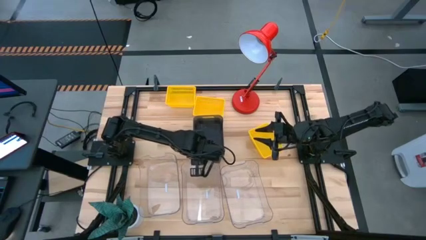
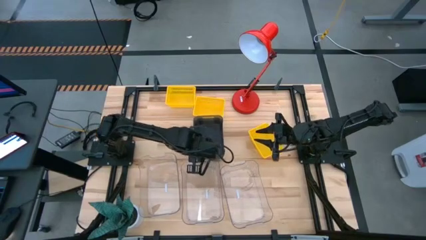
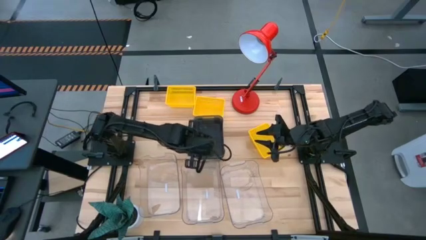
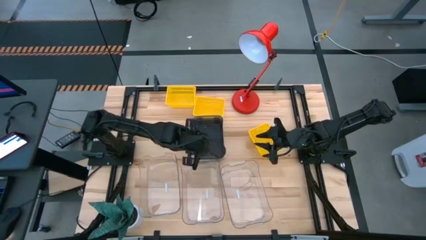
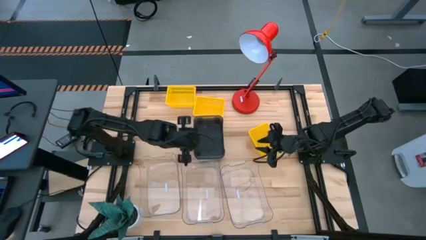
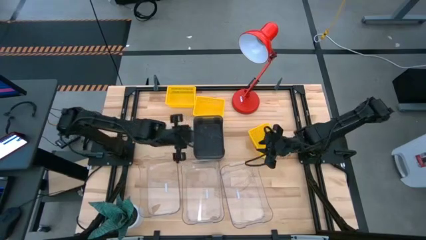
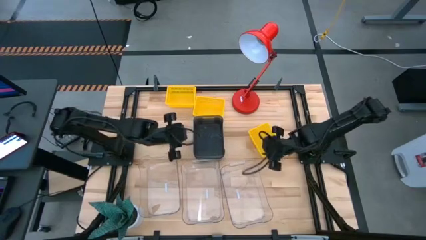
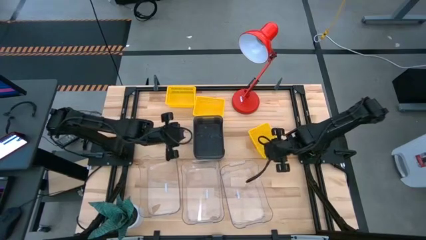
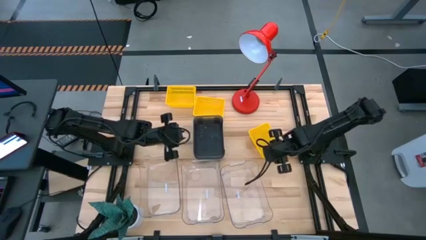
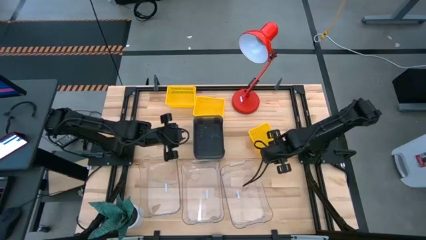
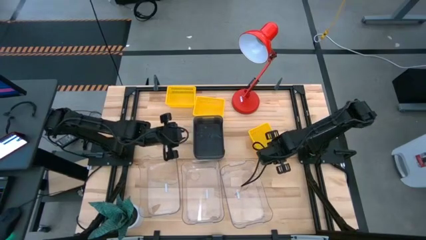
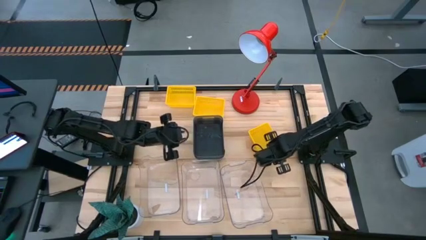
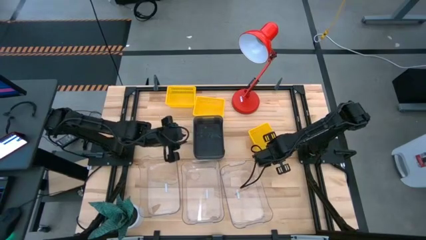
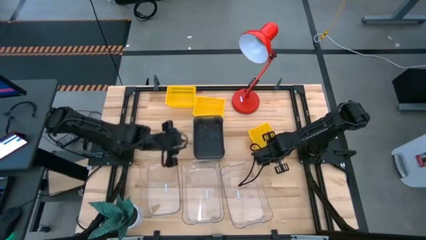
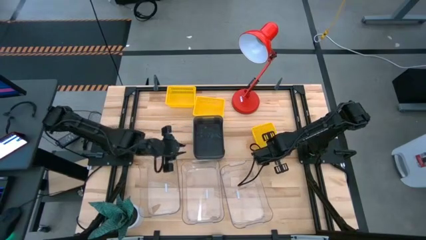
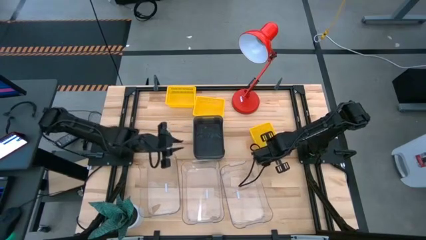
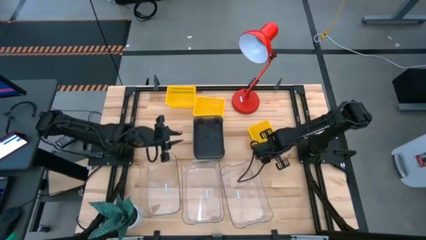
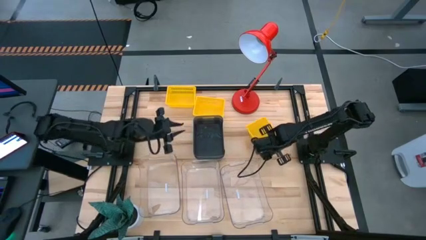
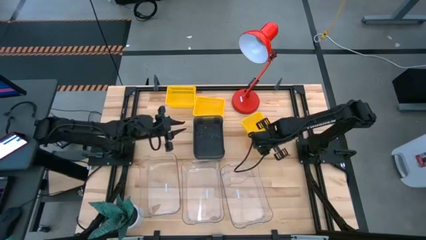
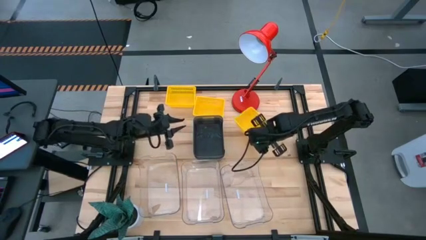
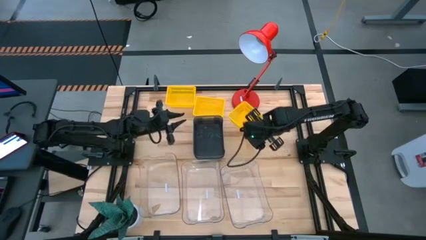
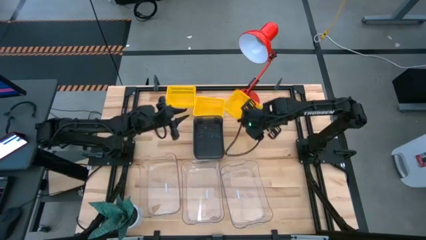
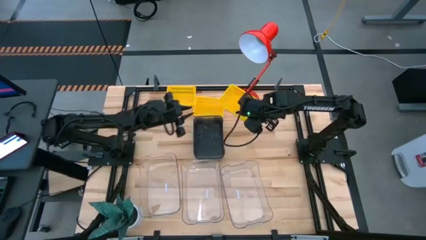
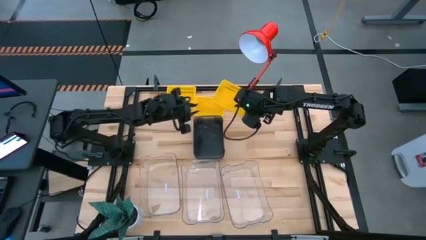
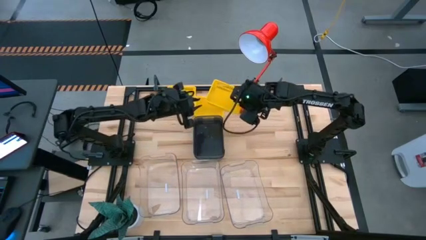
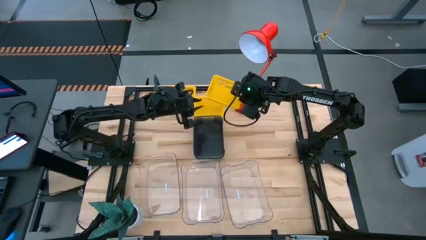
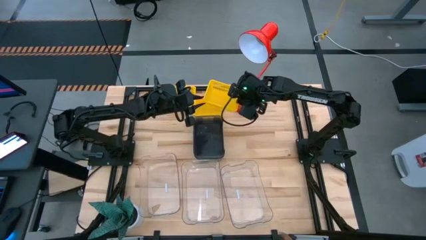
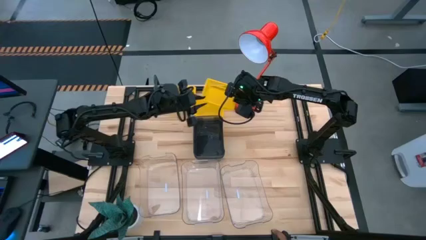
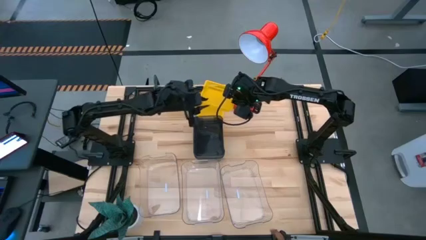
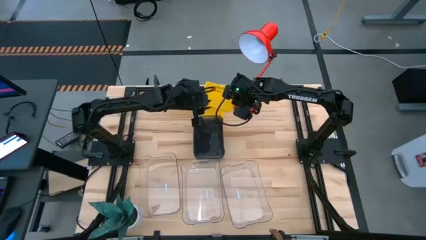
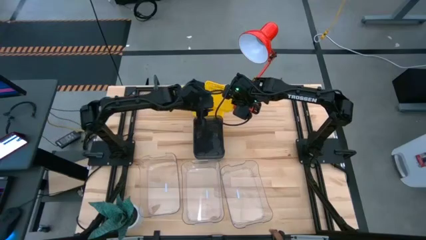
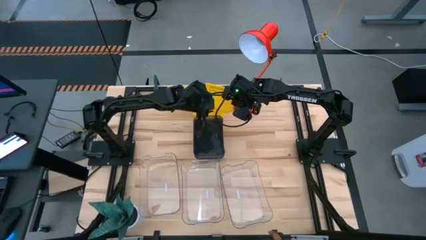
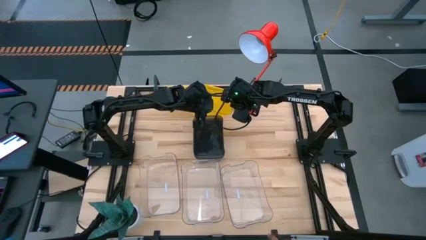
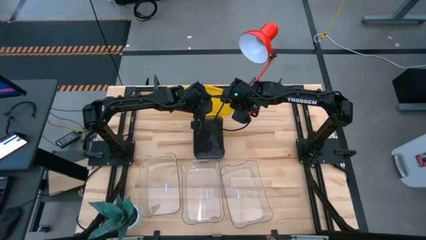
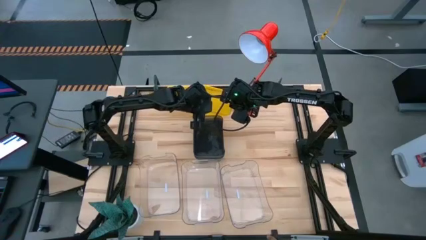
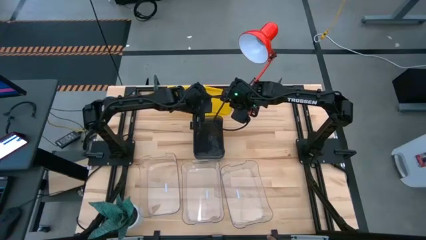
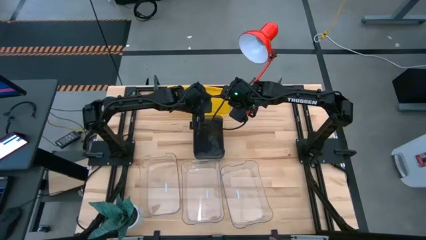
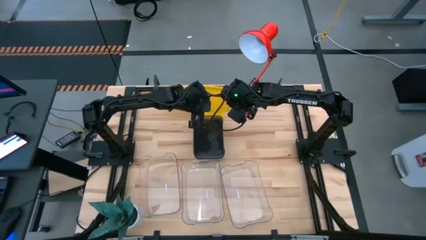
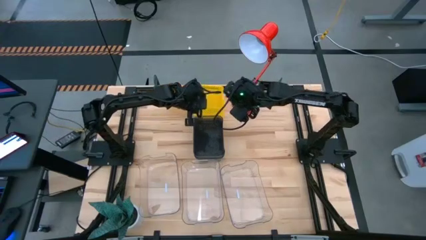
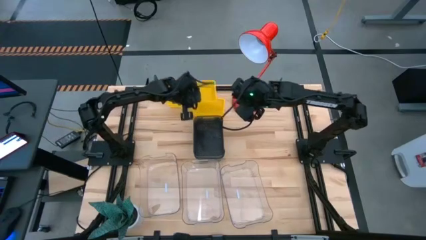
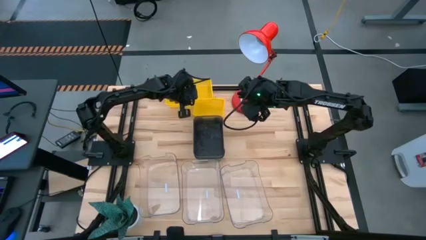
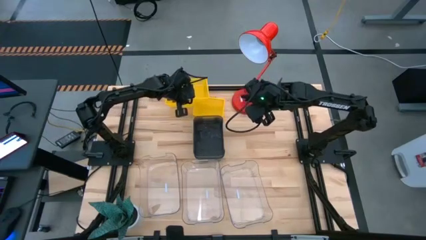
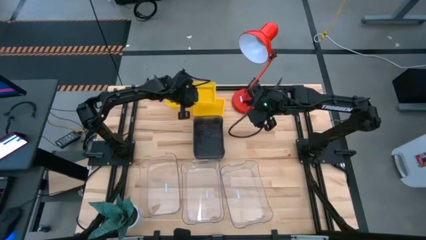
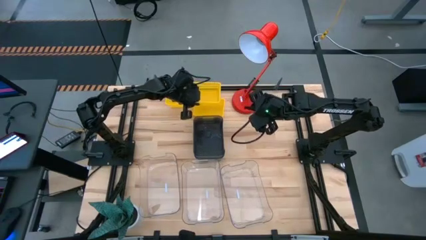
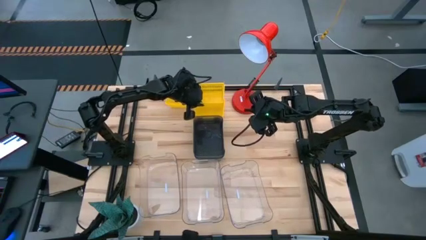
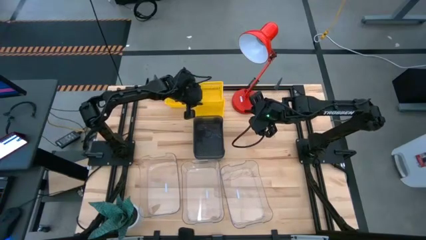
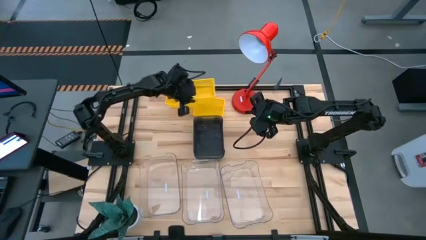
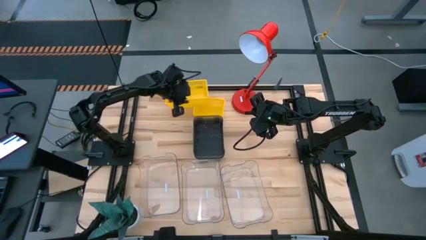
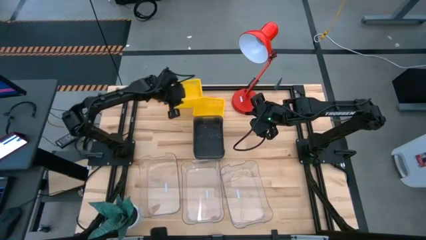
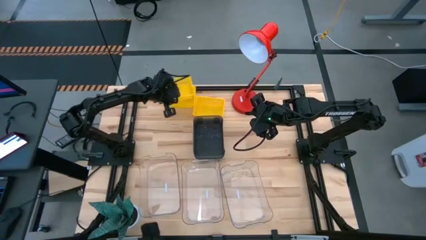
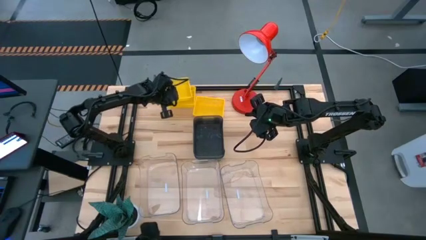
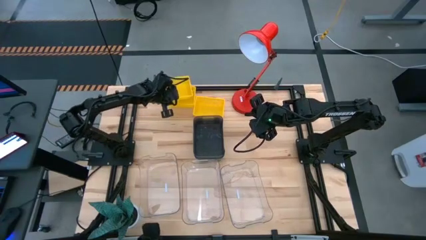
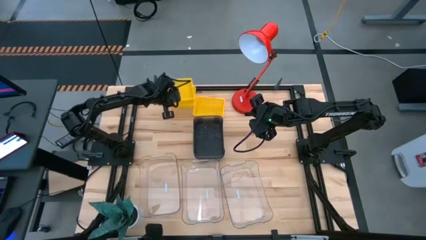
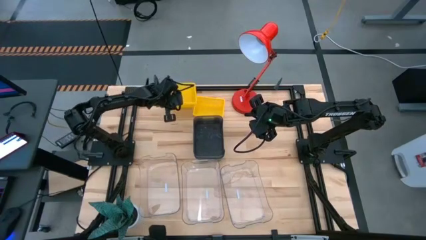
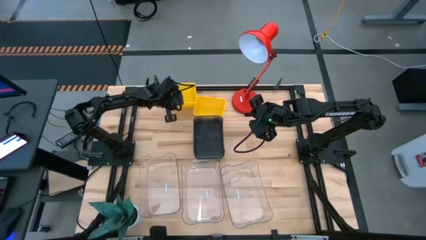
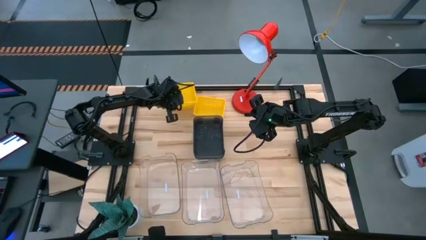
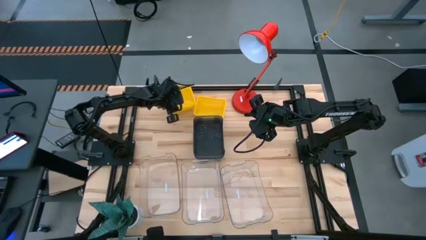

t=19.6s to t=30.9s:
Stack the bottom yellow bin on top of the top yellow bin

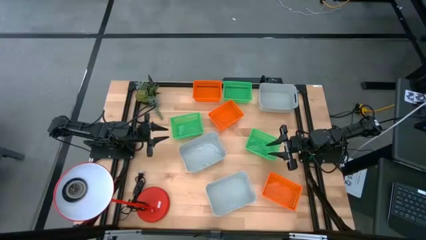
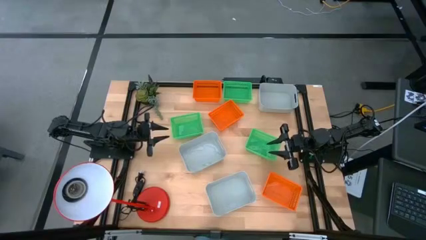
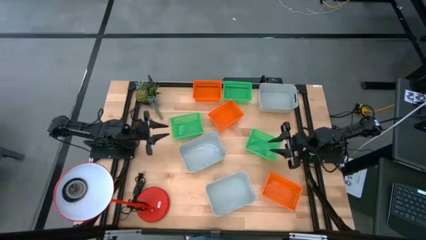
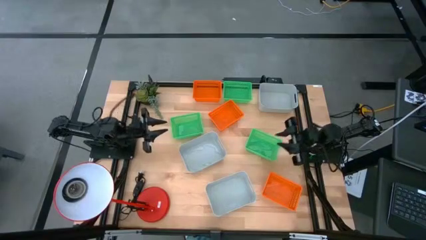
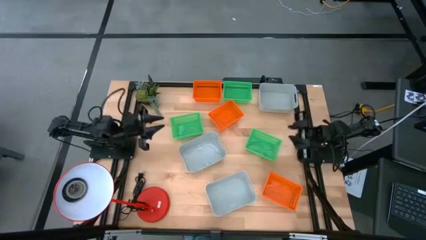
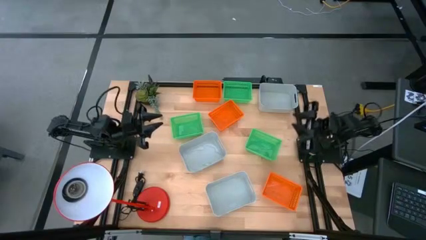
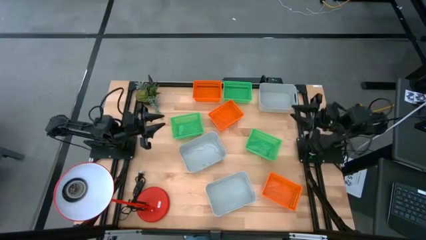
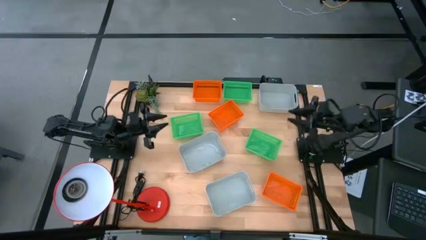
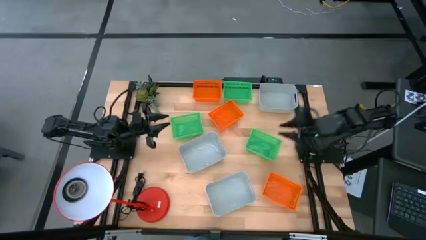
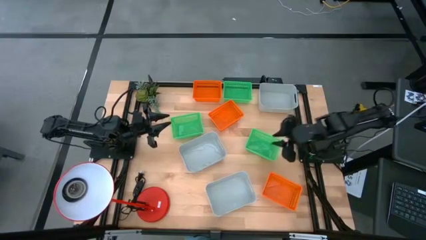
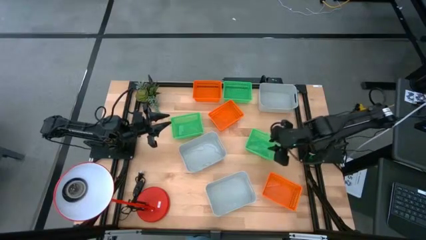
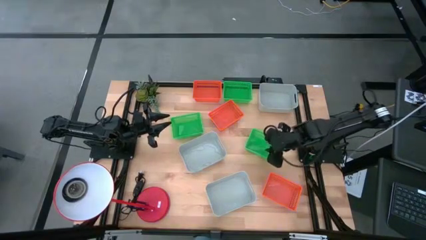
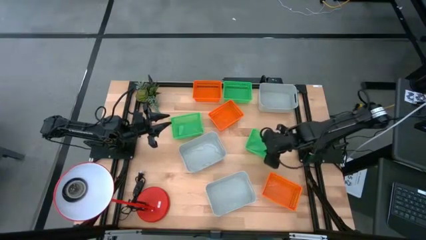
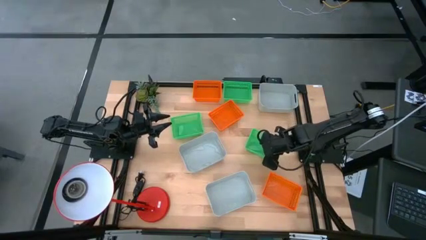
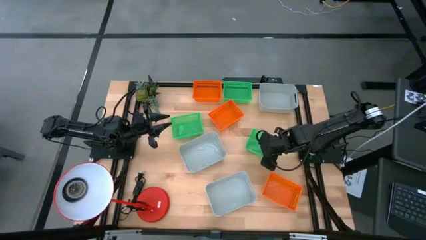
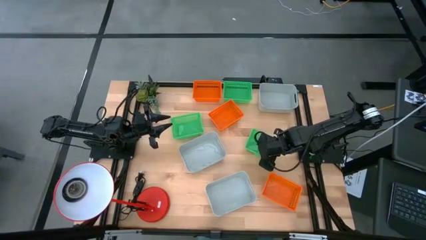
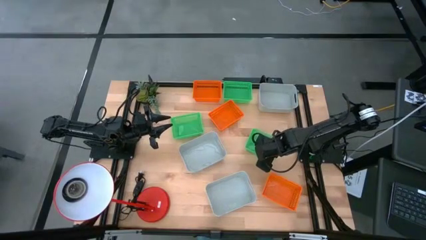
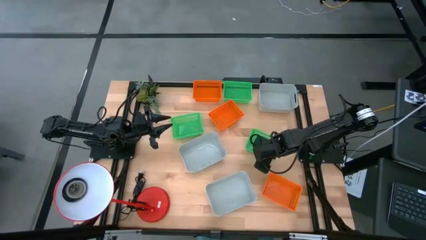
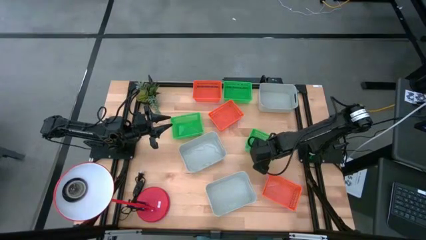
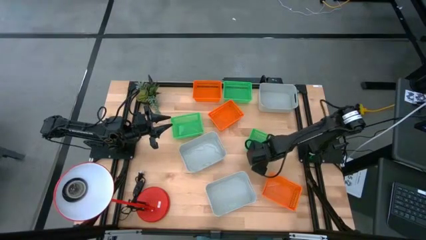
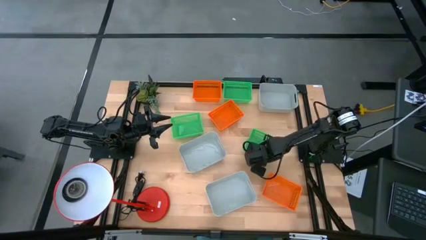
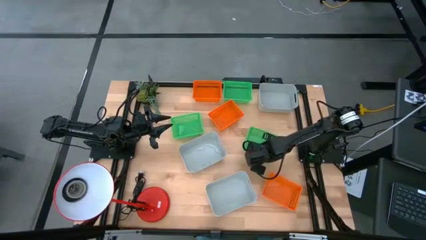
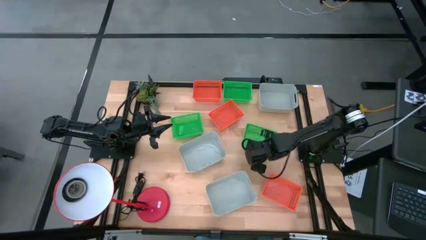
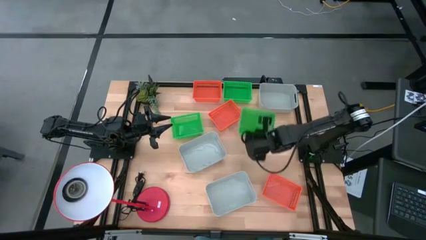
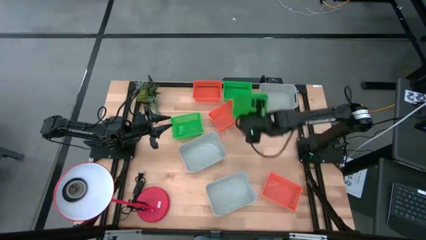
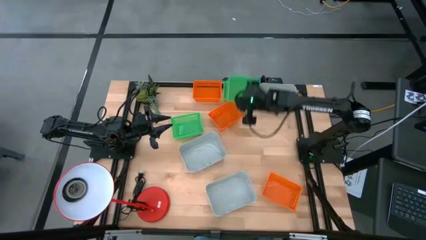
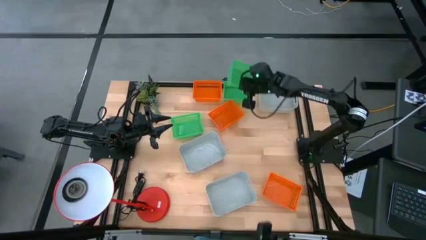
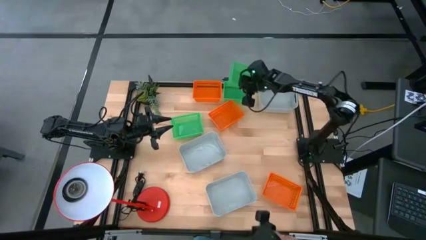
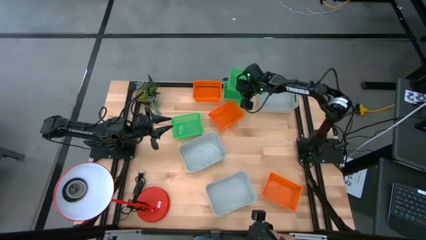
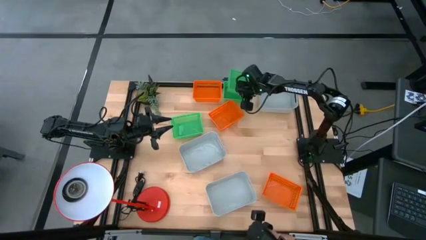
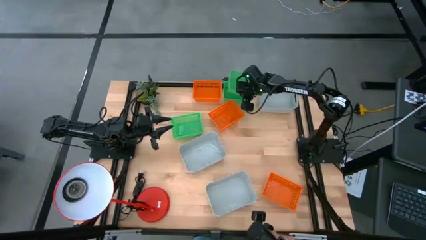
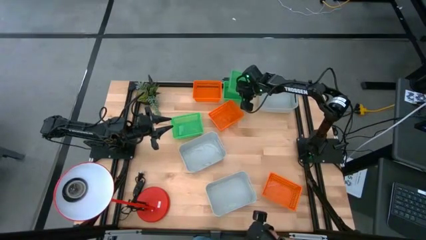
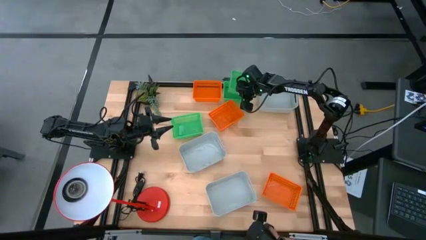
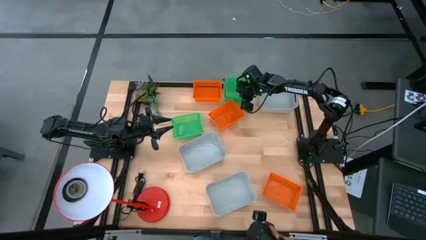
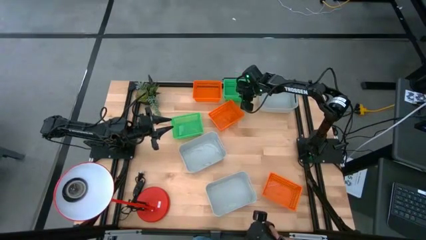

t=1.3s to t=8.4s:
Stack the bottom right green bin on the top green bin
